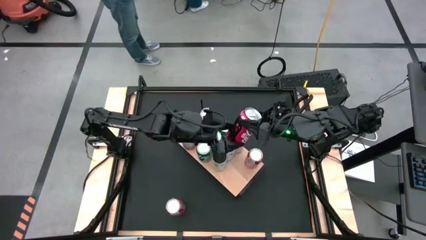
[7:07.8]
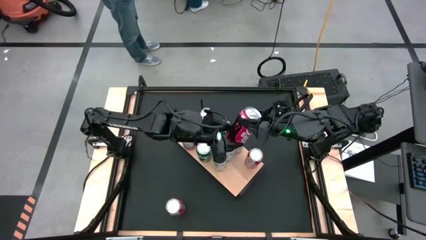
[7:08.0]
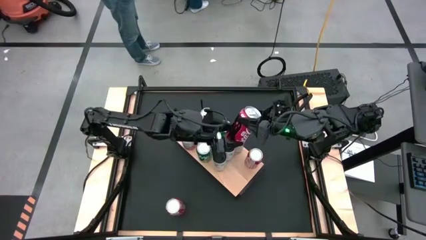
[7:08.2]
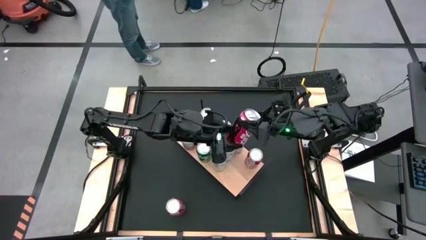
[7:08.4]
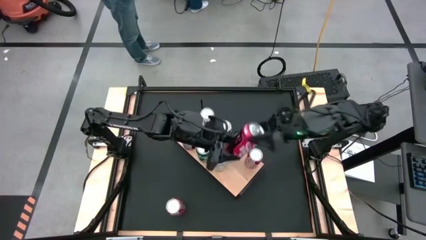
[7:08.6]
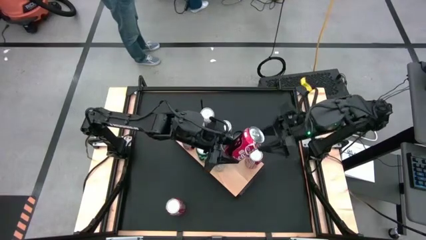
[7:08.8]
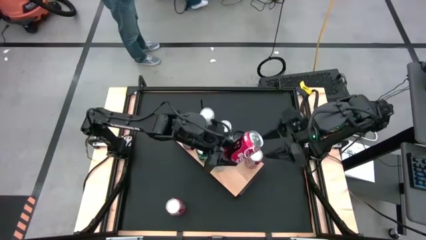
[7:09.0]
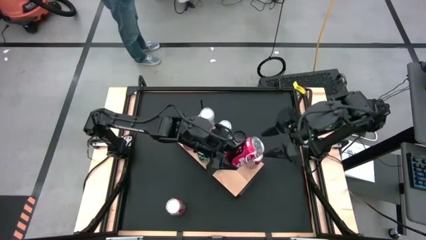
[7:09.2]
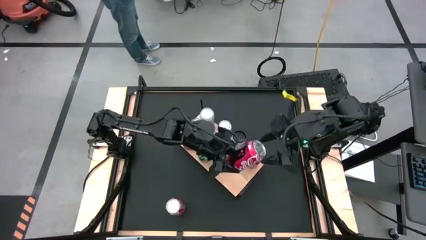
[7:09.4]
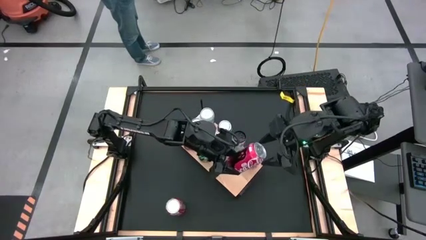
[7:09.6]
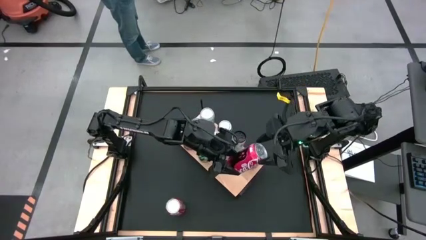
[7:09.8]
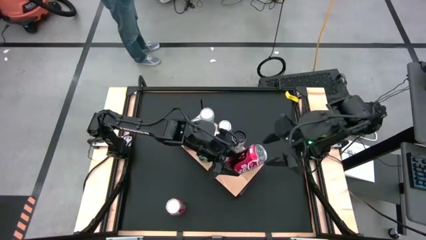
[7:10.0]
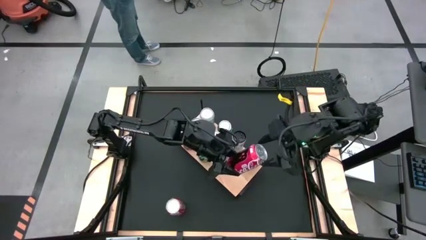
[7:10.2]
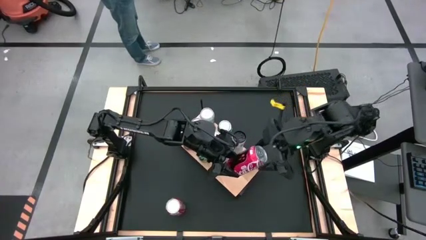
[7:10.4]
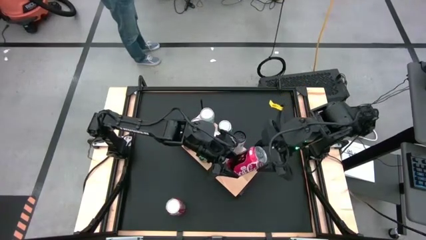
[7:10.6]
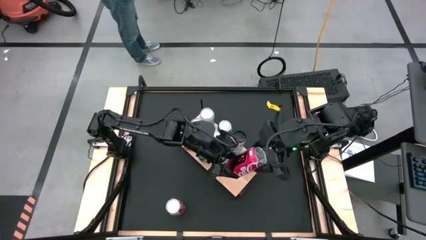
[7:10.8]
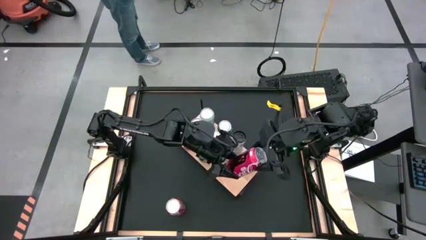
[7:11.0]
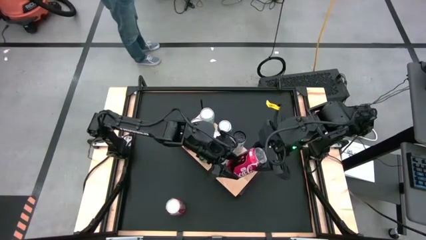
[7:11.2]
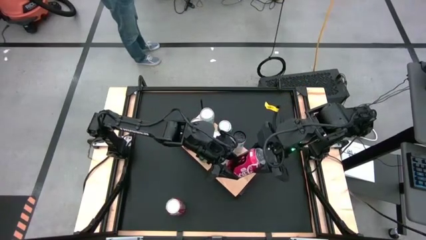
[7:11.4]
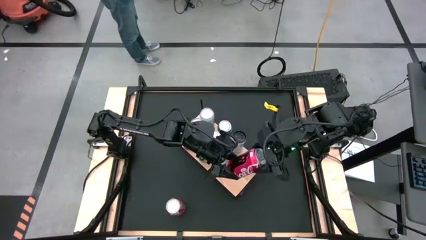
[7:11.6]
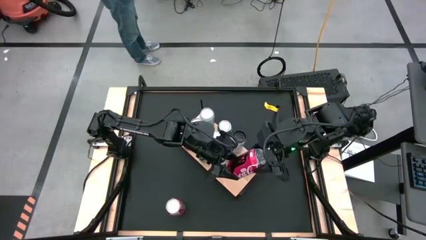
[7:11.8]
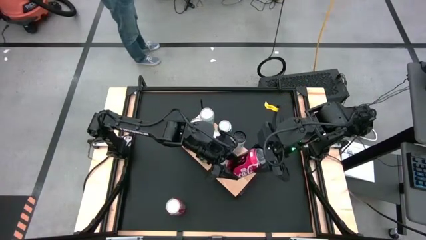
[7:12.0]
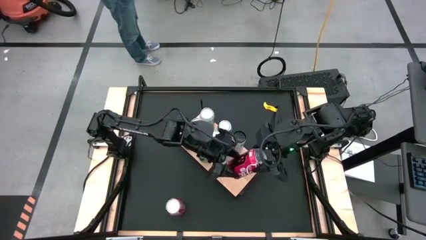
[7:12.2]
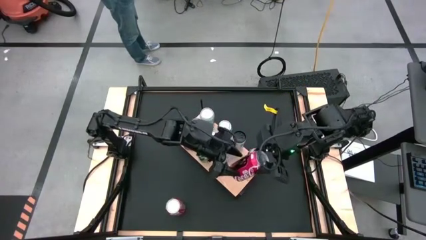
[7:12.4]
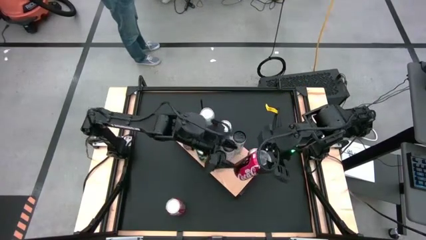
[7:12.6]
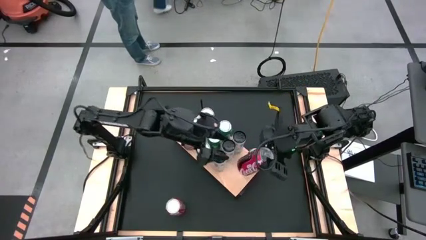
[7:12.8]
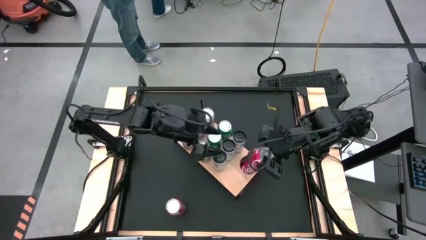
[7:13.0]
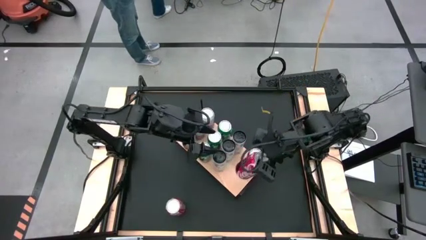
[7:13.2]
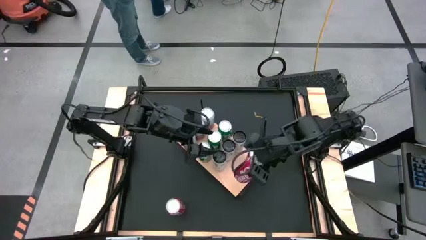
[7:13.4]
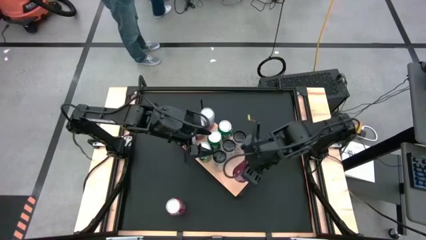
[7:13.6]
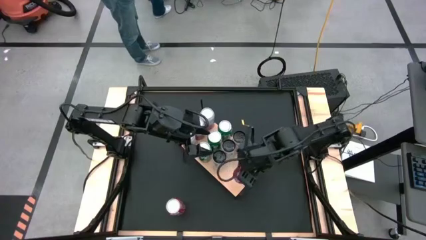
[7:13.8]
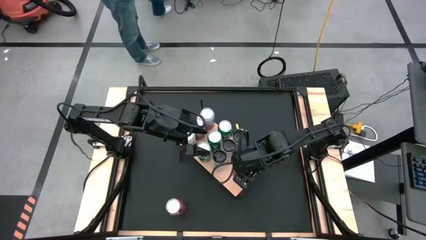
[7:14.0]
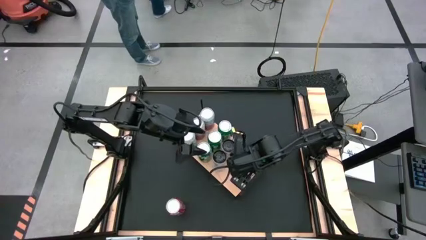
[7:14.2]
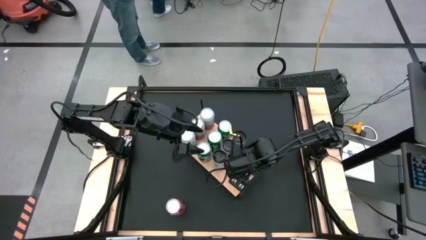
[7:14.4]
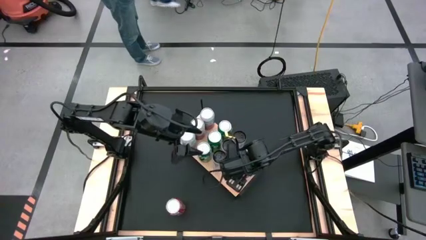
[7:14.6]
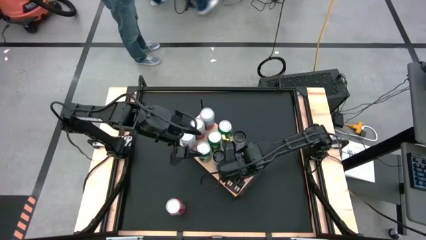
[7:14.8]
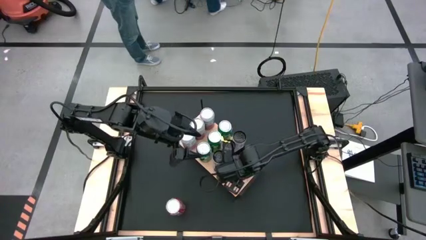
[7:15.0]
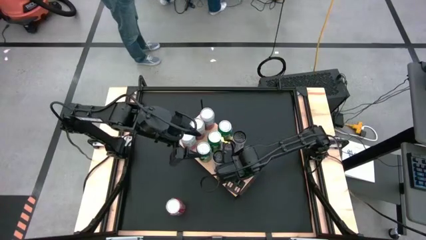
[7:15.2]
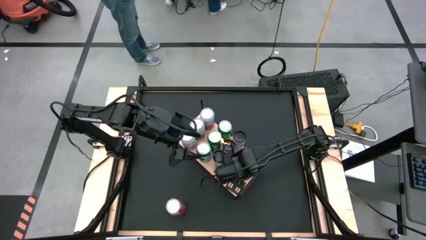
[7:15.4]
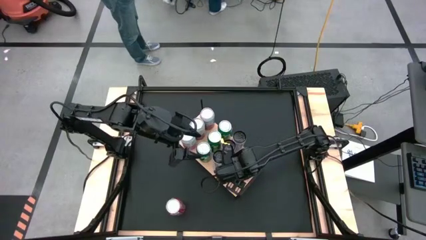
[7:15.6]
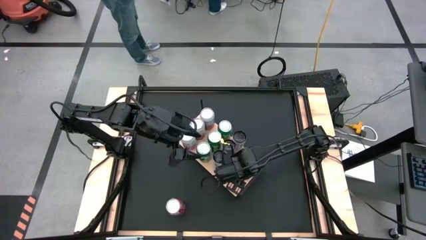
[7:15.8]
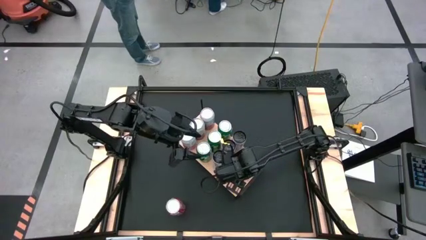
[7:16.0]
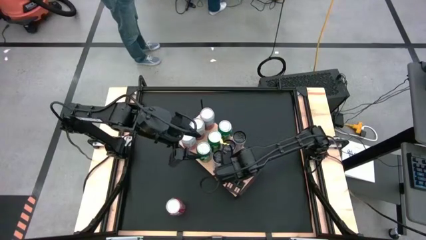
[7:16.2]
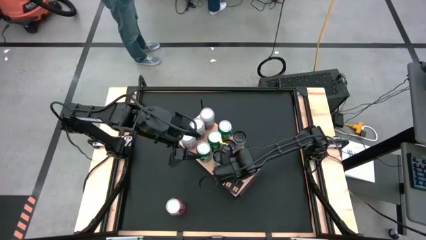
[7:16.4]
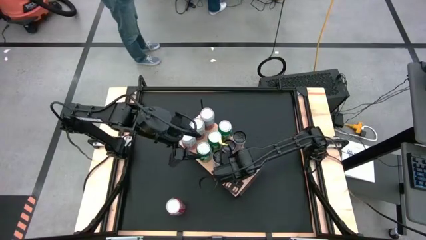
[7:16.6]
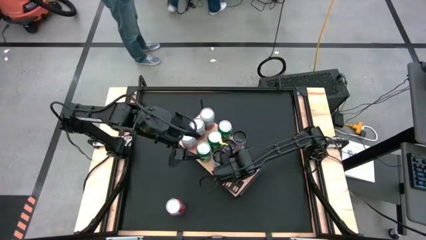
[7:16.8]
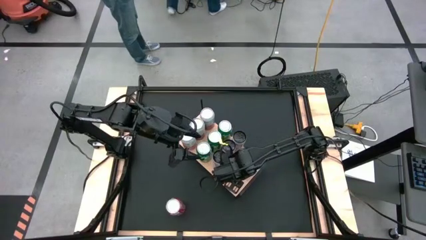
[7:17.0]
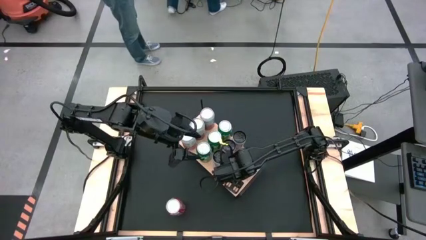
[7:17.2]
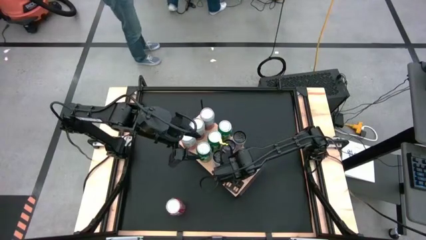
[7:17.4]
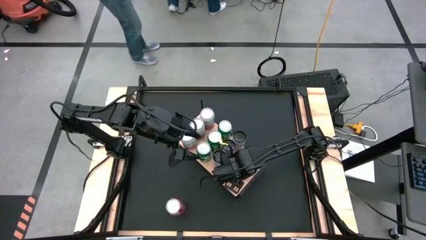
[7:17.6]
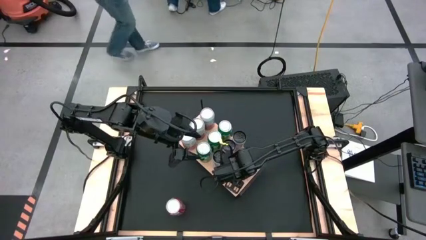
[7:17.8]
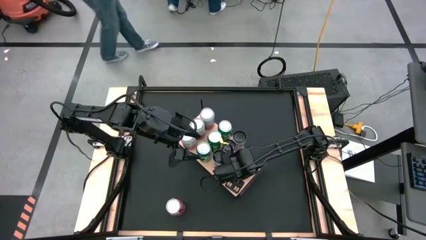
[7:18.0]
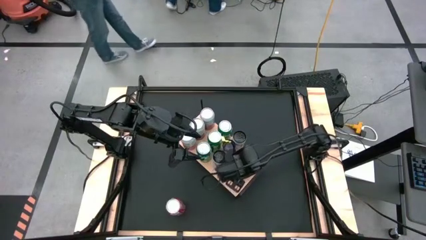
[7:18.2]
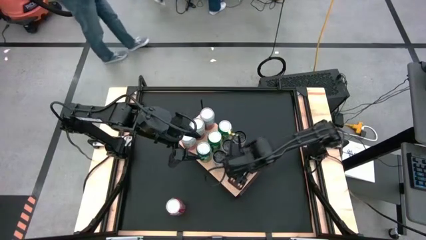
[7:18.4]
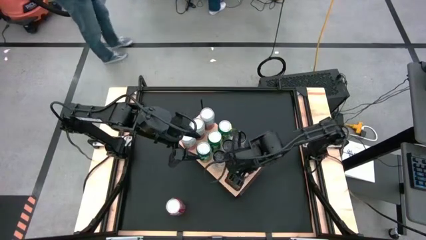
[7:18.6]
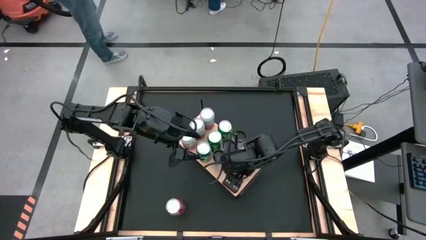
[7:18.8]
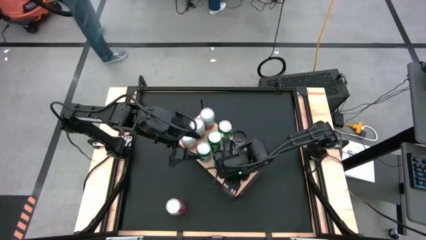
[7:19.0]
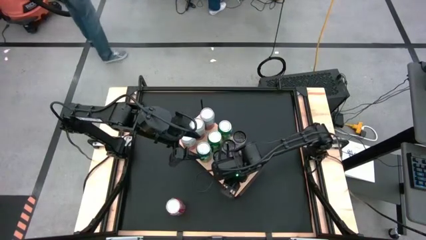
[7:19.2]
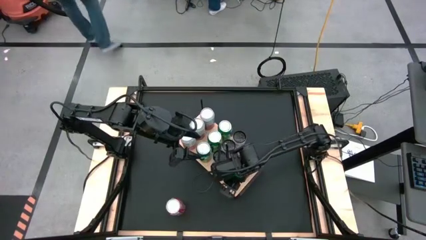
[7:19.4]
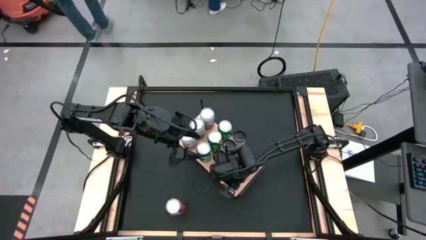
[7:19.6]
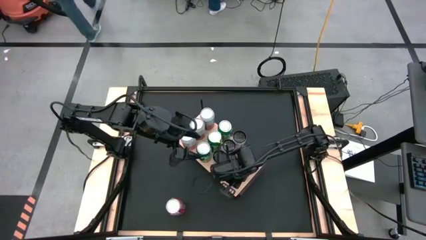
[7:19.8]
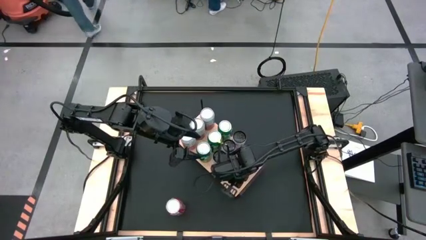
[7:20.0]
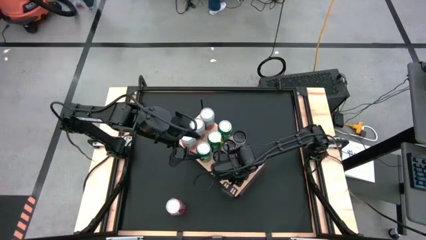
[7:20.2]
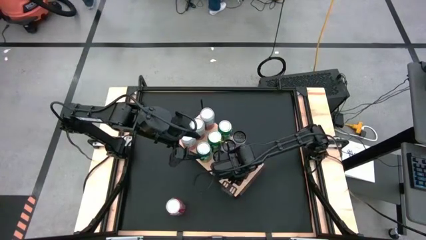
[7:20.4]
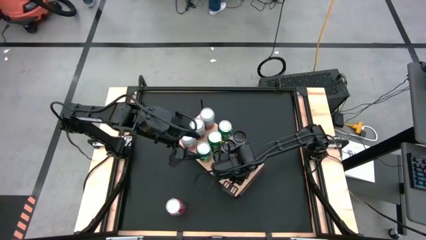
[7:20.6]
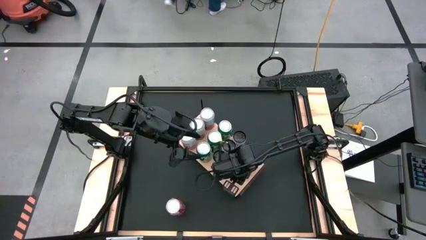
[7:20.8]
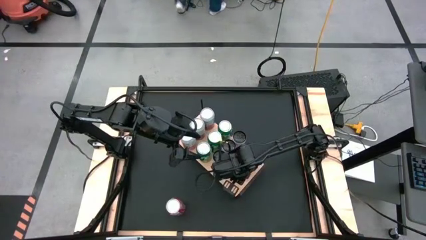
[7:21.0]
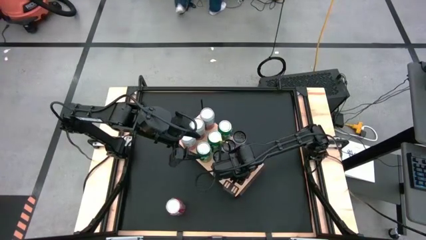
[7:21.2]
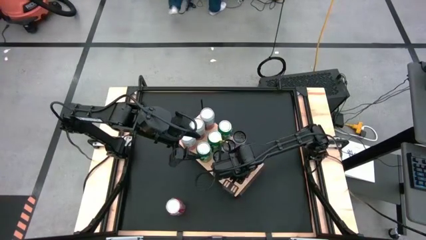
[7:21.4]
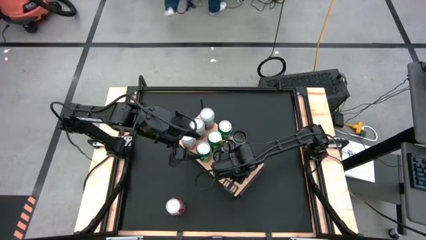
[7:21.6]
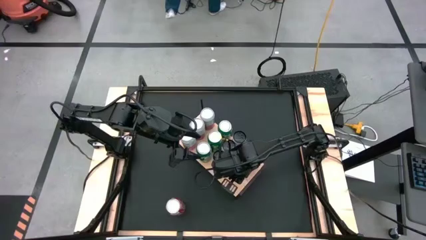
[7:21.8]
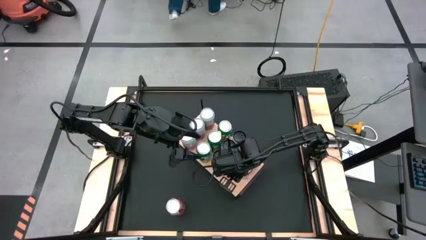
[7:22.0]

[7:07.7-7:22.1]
Task: Place canned beverage on shelf
Put the right red soda can aligned with the other red soda can
